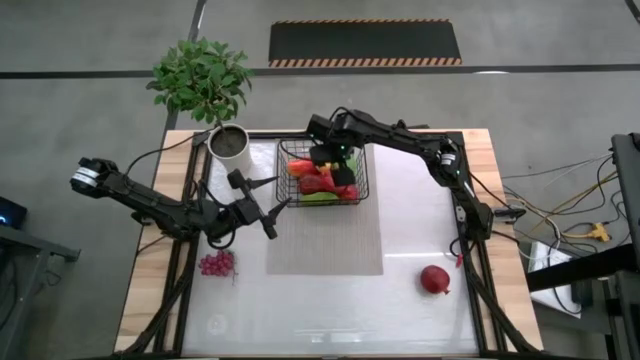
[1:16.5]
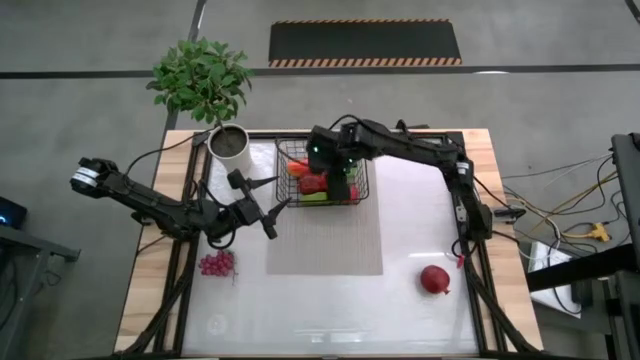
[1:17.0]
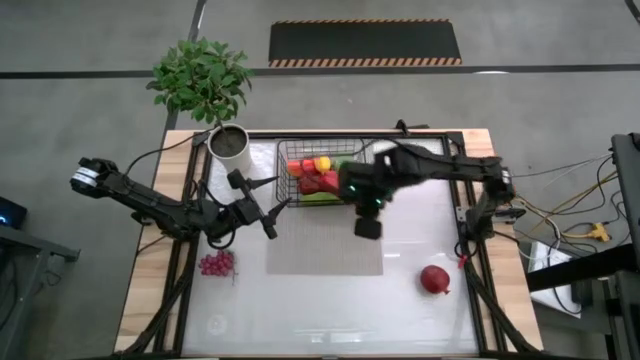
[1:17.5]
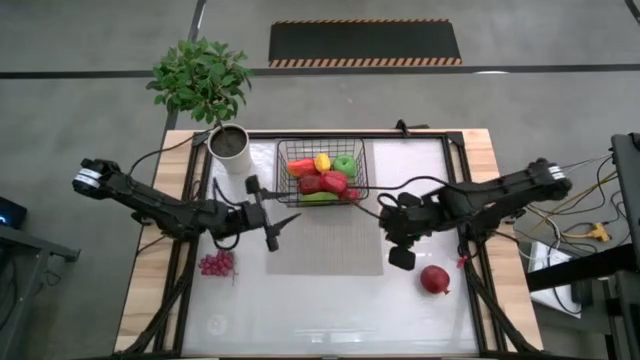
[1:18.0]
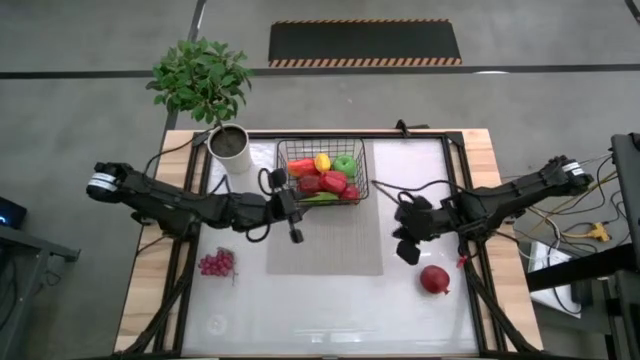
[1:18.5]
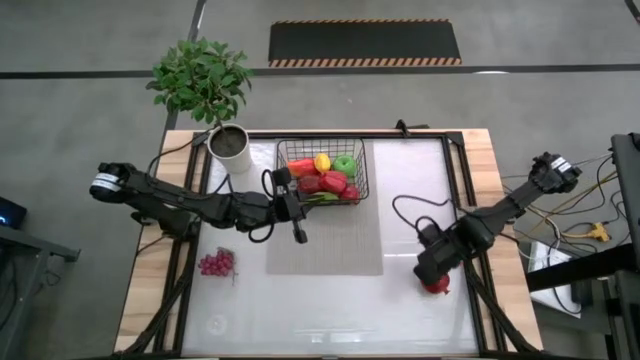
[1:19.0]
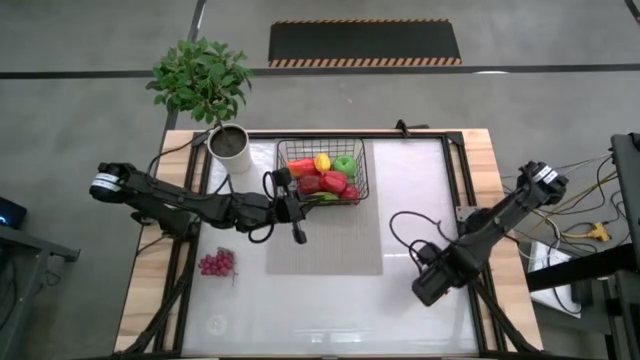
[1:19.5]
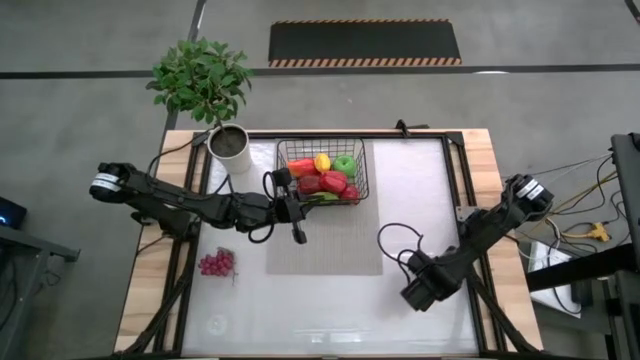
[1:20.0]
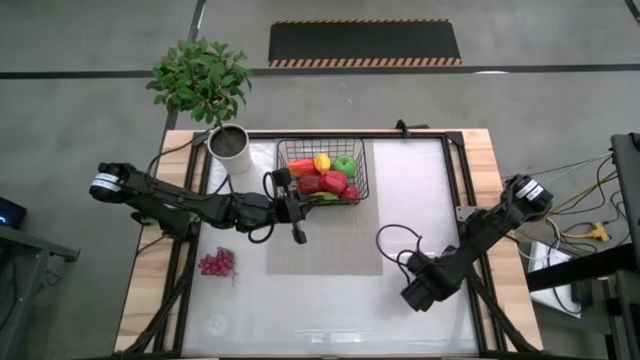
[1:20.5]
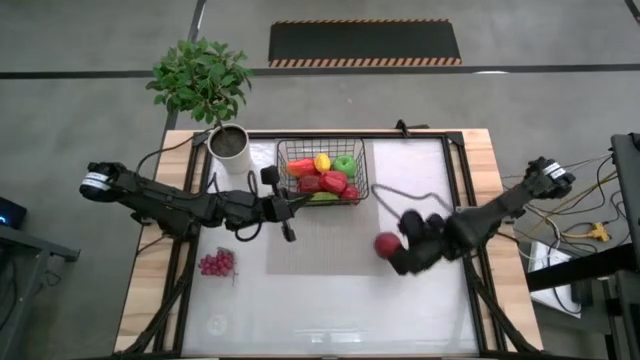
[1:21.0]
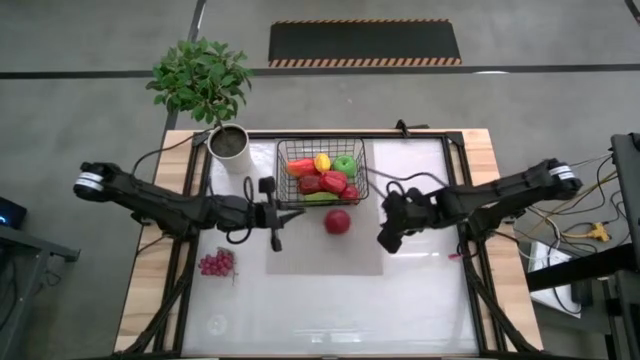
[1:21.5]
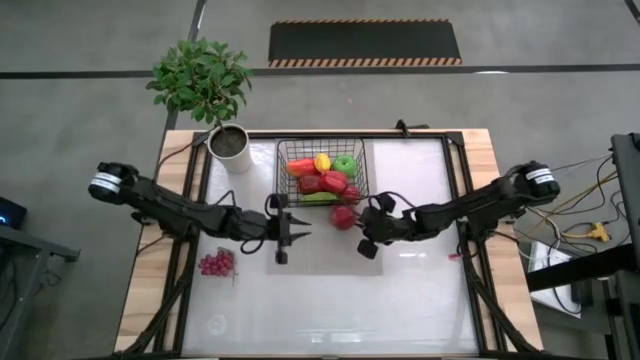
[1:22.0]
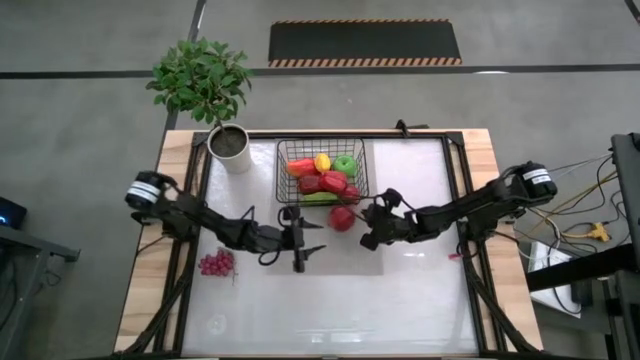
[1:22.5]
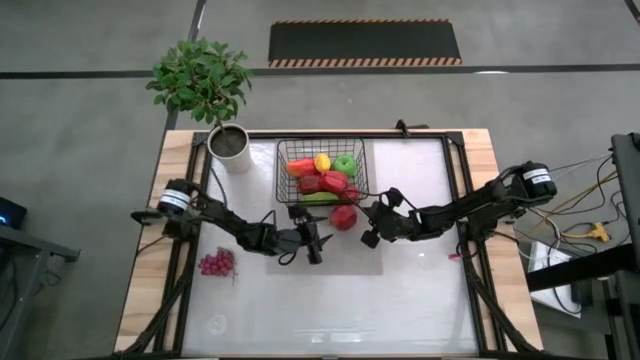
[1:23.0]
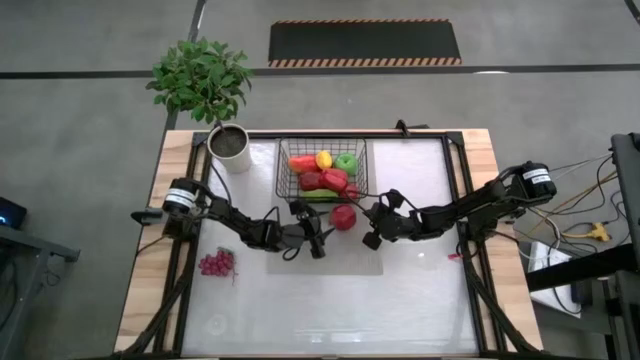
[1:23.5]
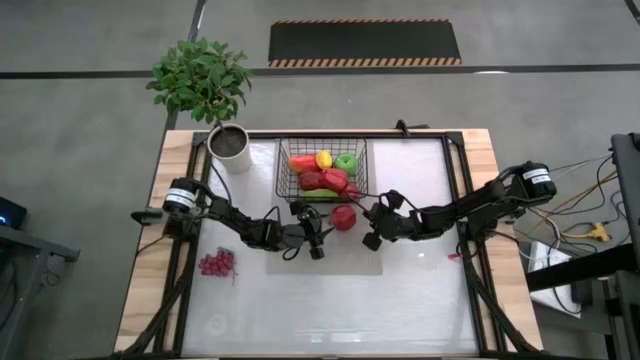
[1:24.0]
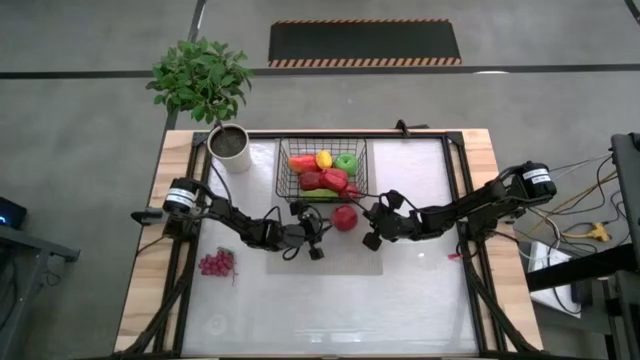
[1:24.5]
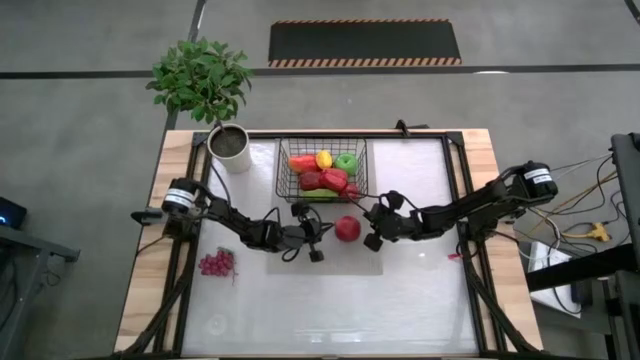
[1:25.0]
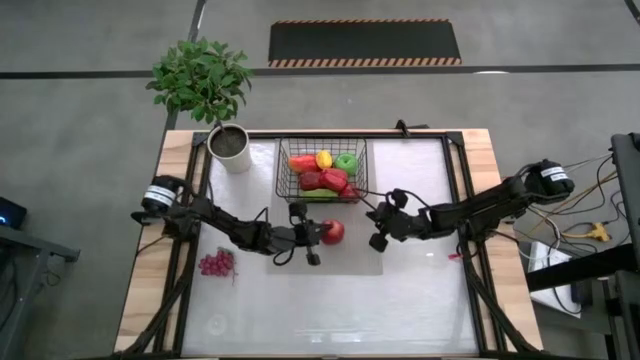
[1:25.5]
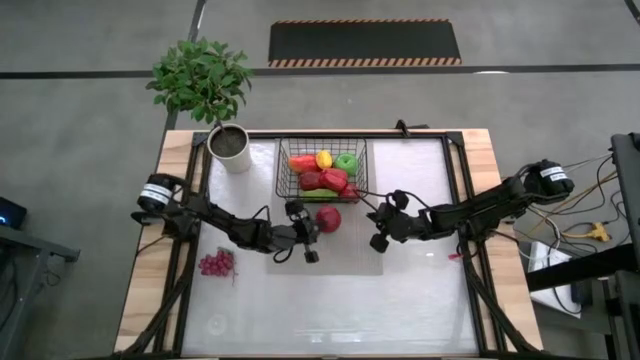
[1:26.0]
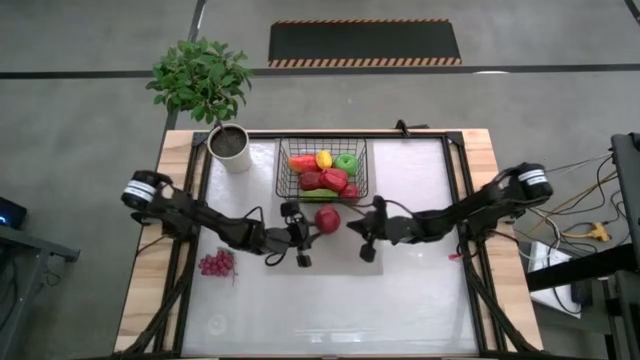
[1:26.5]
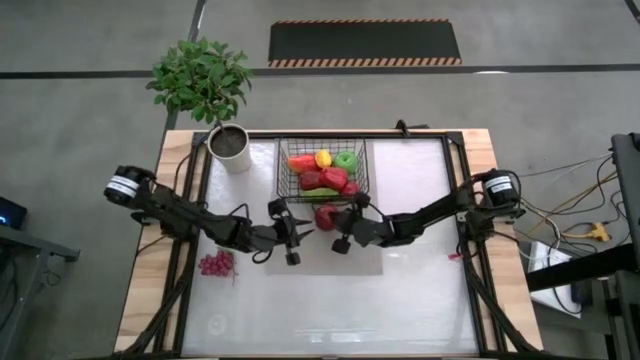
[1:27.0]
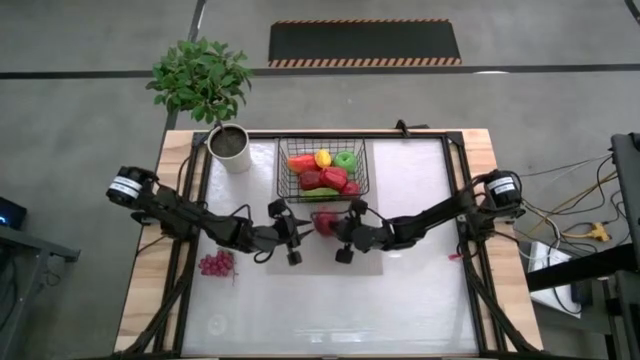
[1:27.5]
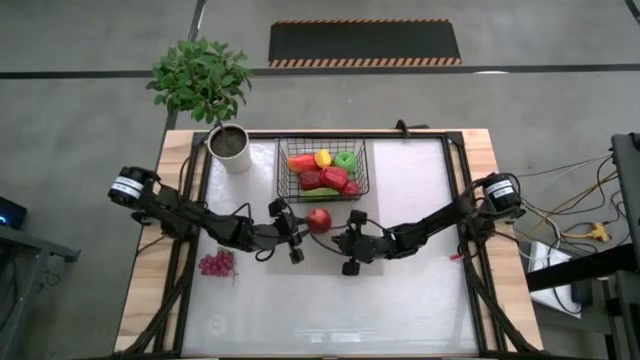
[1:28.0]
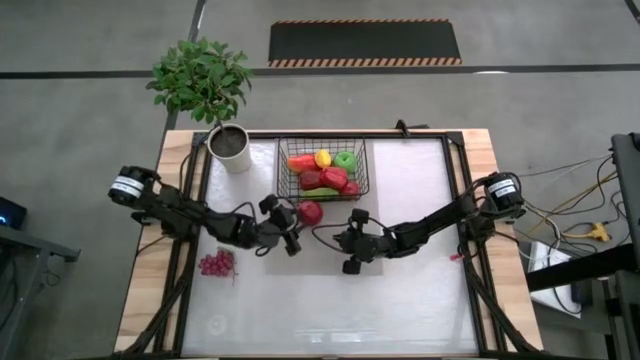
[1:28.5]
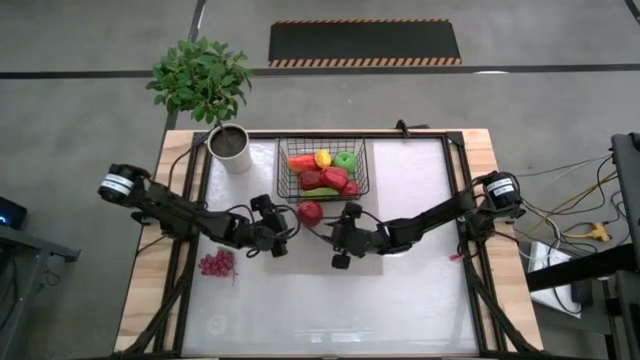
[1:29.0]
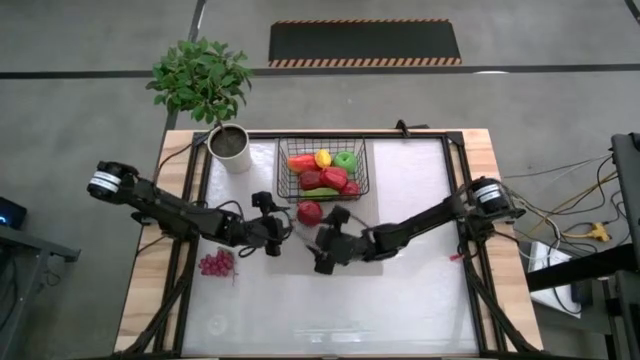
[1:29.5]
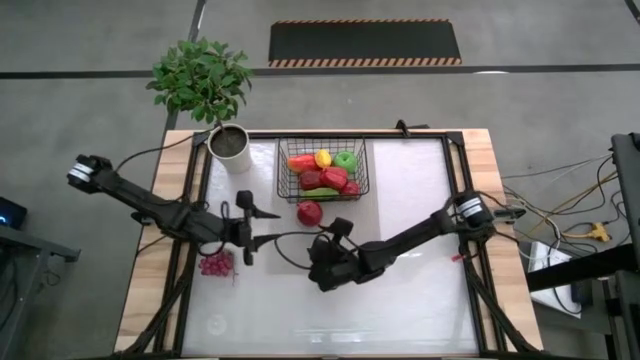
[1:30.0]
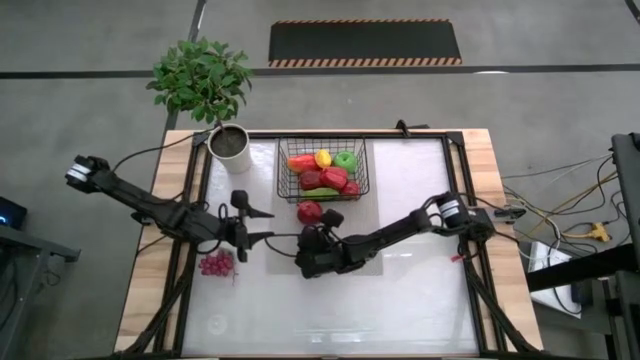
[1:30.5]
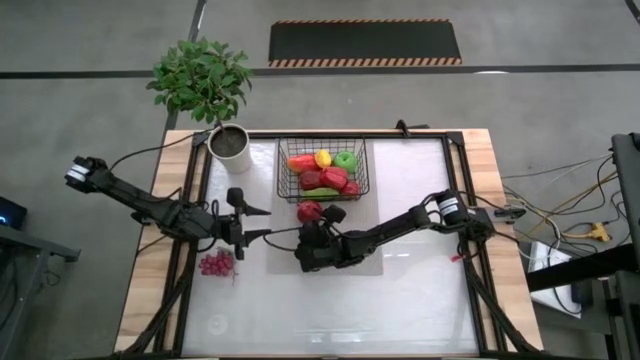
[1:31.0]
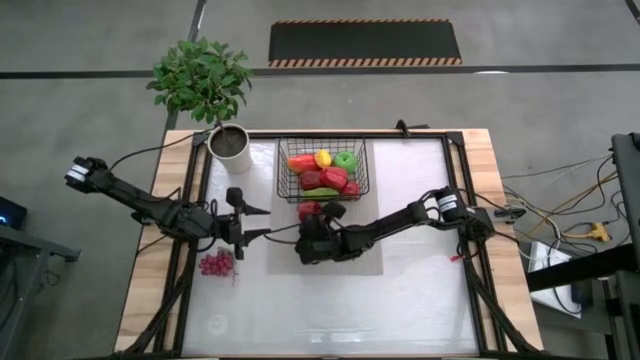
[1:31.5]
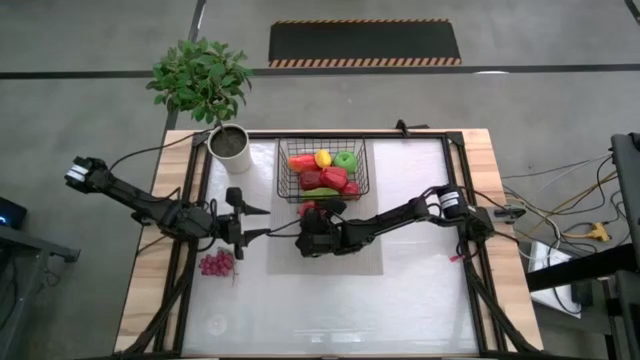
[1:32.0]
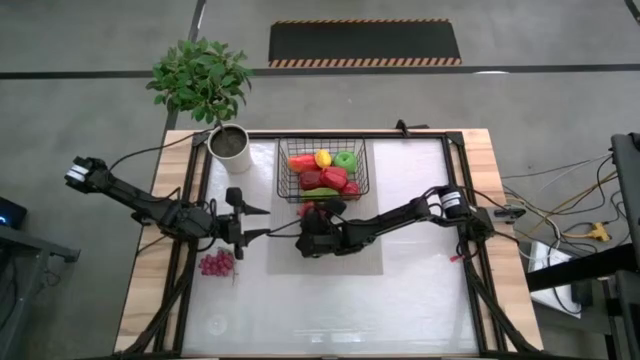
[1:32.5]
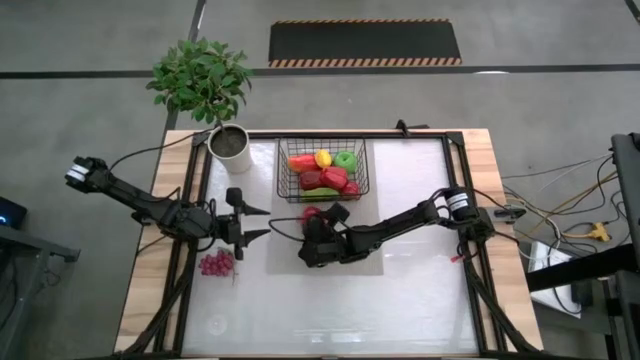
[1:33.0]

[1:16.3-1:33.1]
Task: Build produce basket
Put the pomegranate into the wire basket

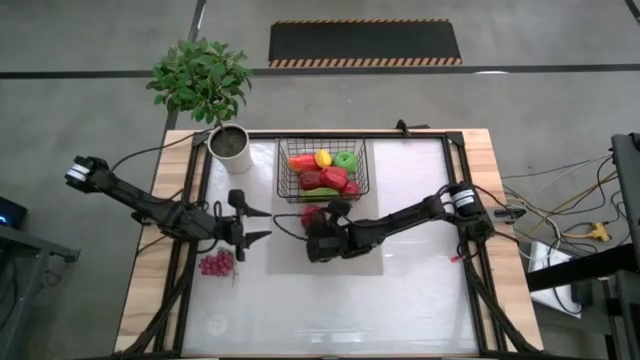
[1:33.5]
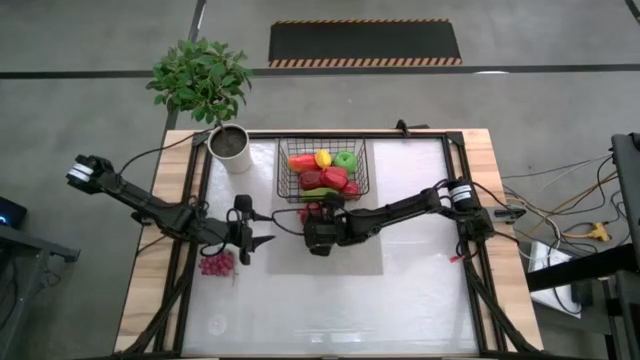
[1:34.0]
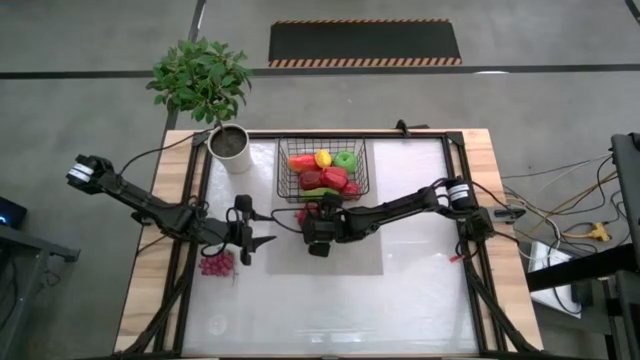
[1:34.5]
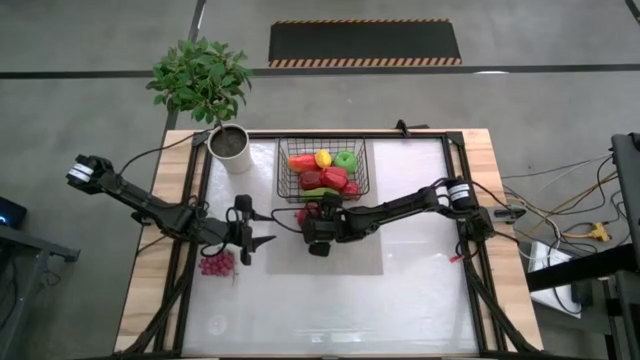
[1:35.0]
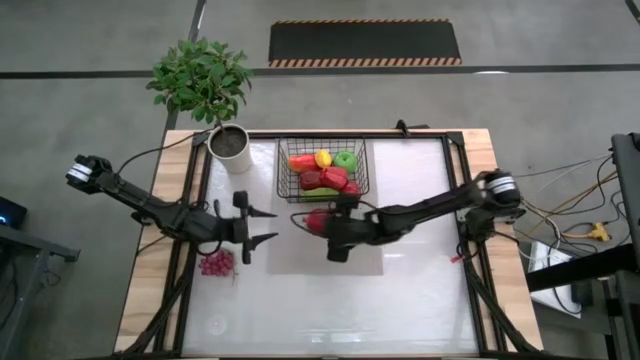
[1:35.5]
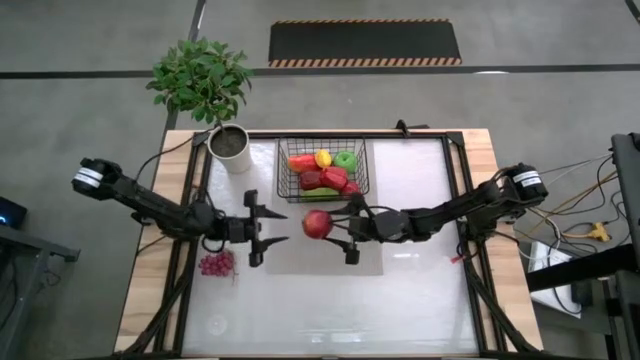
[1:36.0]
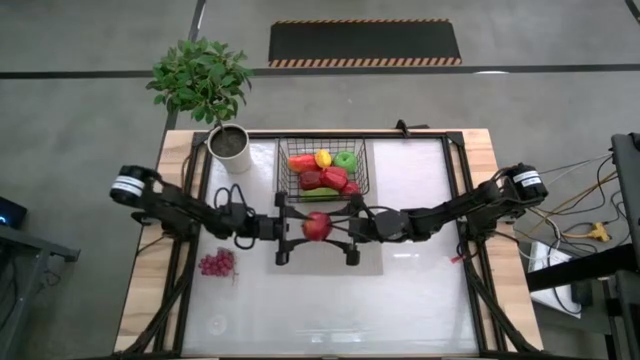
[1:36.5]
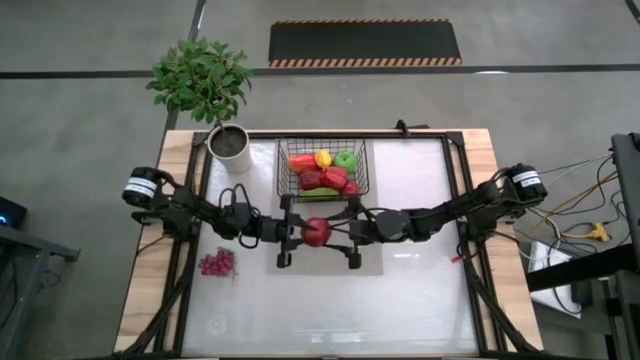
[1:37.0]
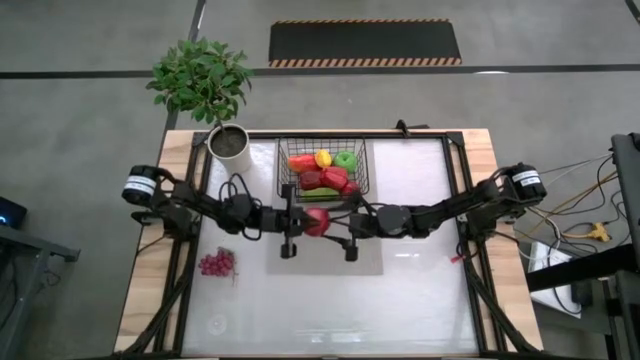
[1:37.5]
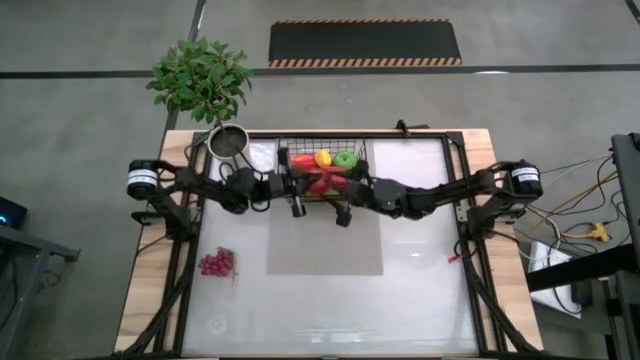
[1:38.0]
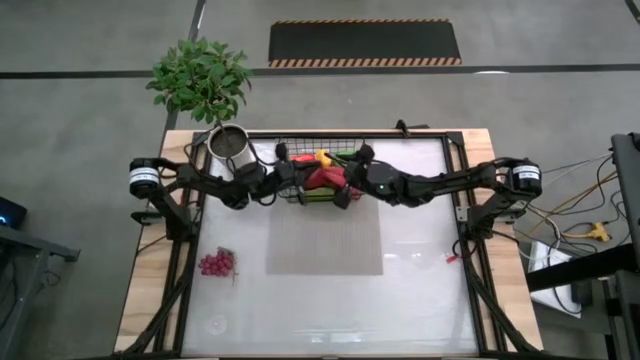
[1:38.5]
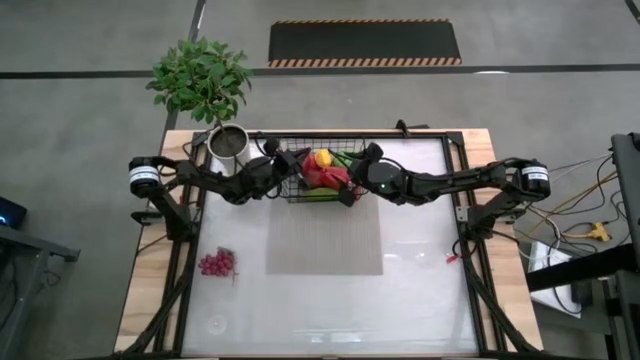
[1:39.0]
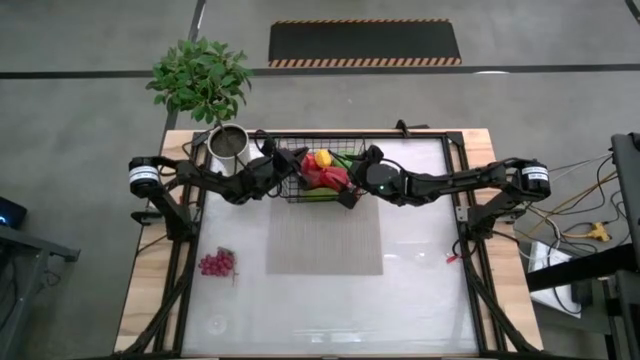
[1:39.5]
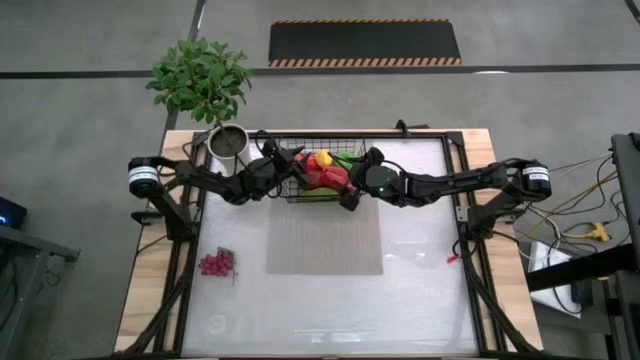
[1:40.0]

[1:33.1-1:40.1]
Put the pomegranate into the wire basket
